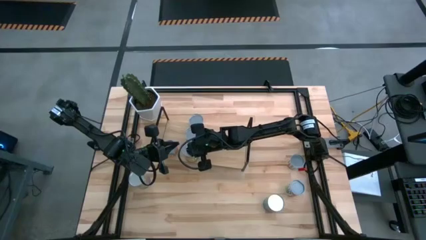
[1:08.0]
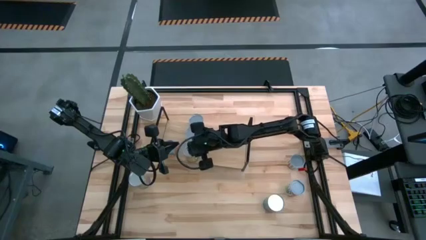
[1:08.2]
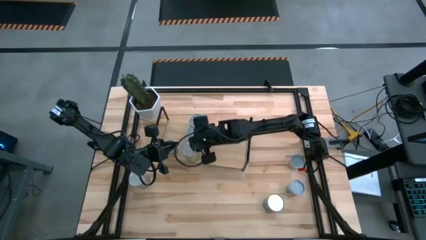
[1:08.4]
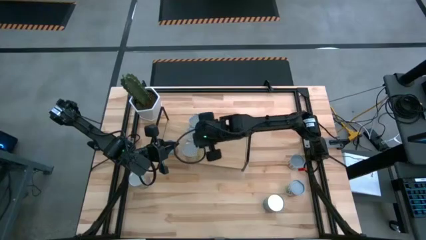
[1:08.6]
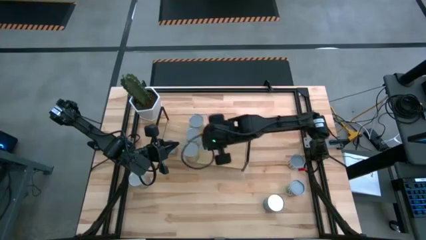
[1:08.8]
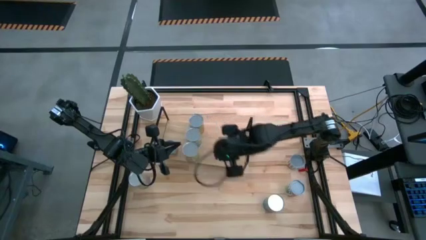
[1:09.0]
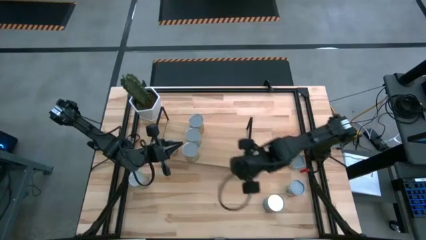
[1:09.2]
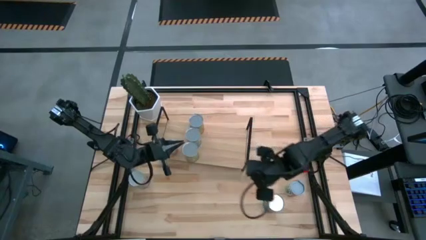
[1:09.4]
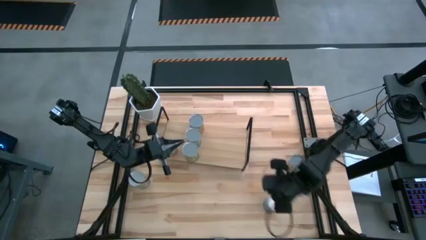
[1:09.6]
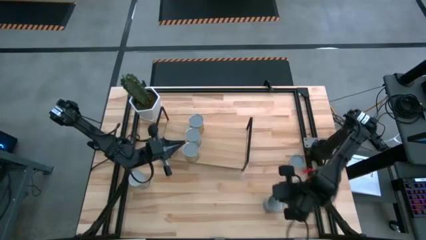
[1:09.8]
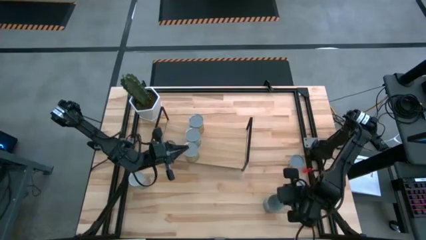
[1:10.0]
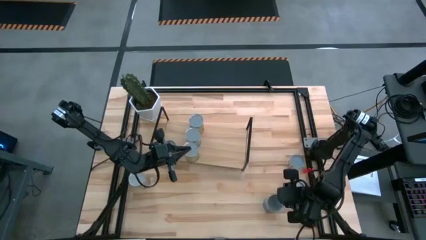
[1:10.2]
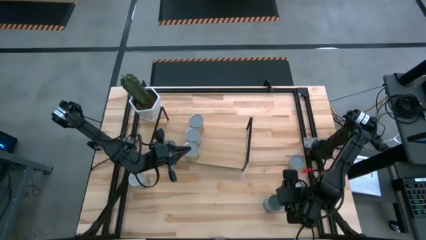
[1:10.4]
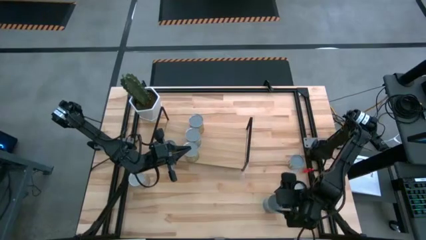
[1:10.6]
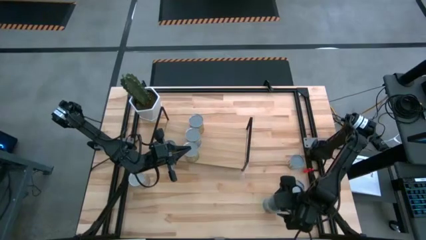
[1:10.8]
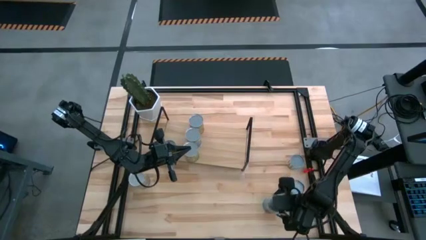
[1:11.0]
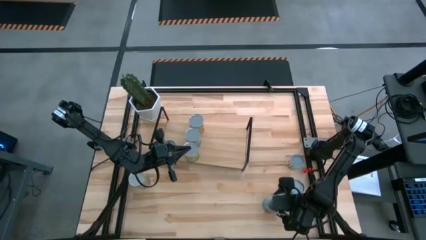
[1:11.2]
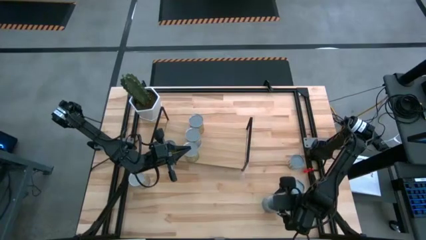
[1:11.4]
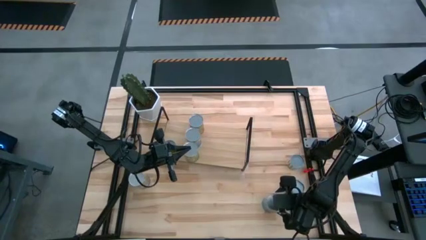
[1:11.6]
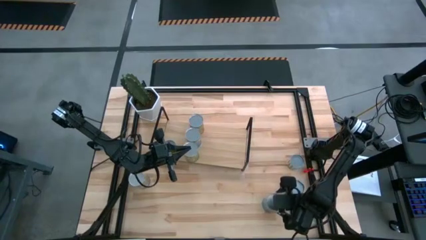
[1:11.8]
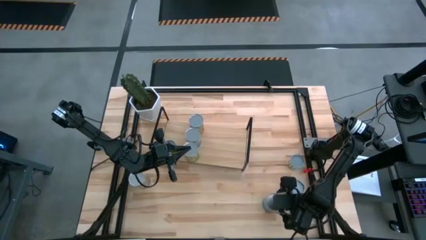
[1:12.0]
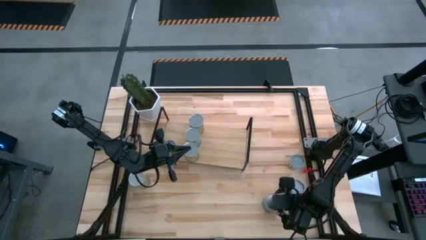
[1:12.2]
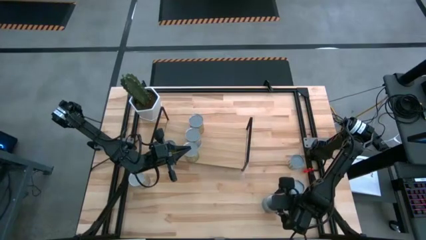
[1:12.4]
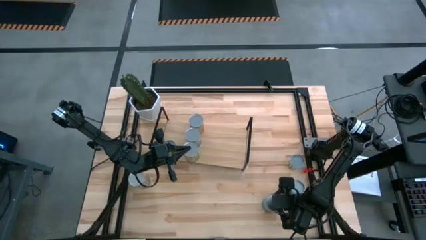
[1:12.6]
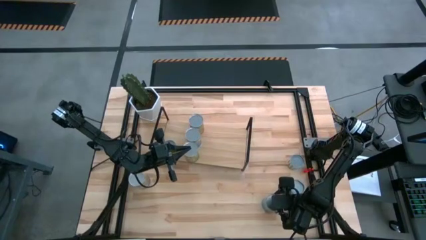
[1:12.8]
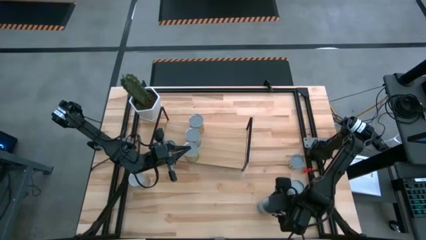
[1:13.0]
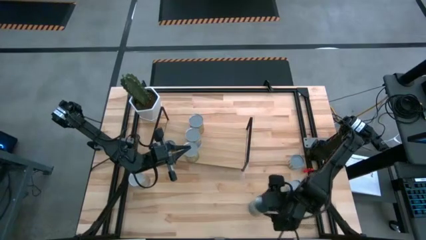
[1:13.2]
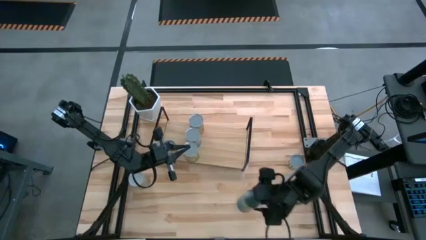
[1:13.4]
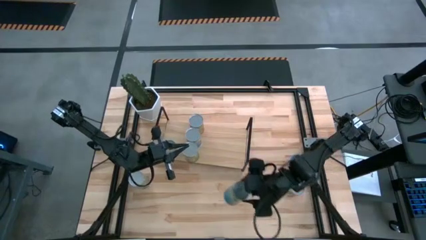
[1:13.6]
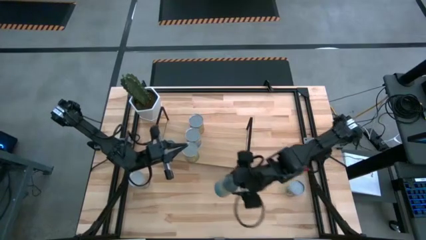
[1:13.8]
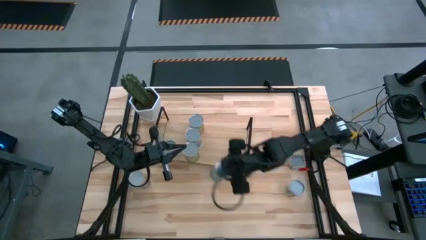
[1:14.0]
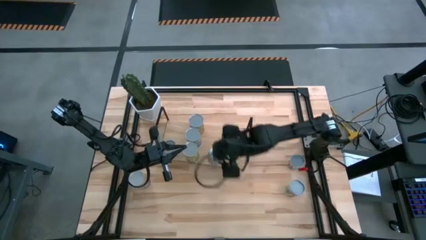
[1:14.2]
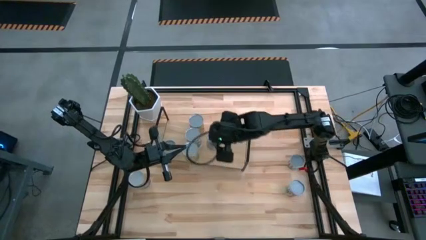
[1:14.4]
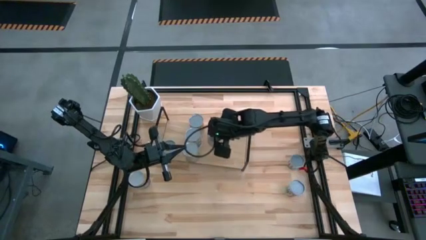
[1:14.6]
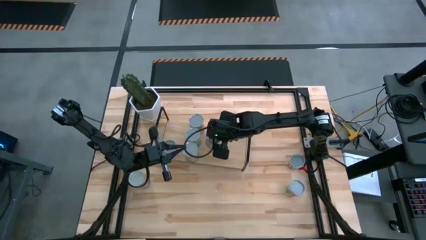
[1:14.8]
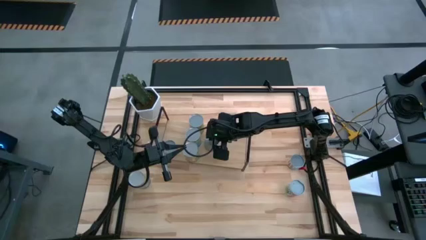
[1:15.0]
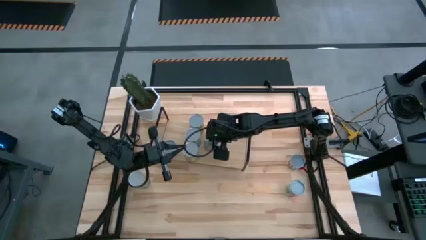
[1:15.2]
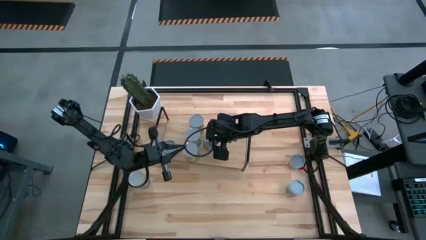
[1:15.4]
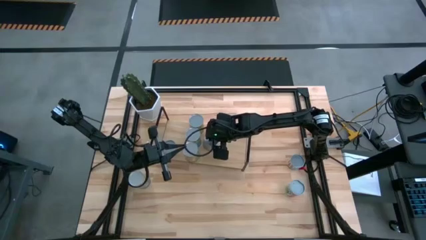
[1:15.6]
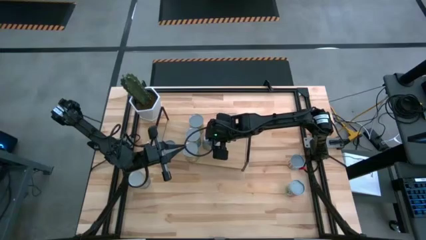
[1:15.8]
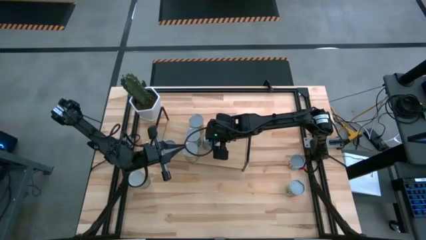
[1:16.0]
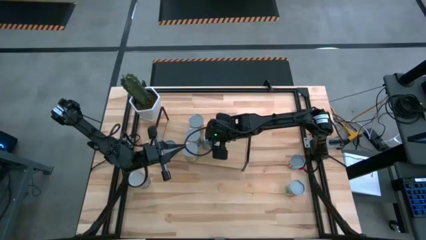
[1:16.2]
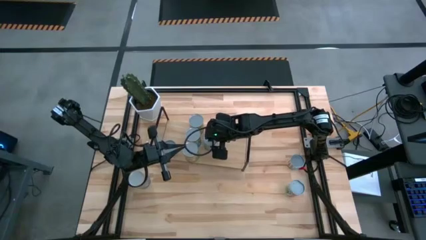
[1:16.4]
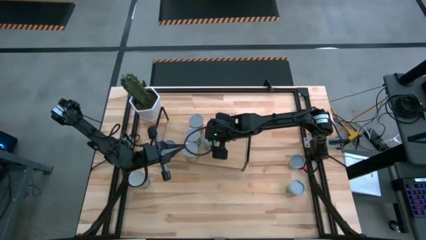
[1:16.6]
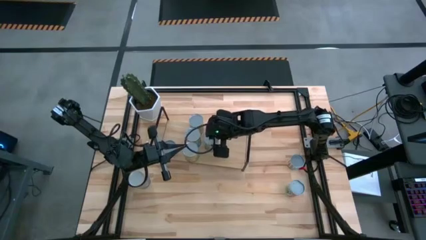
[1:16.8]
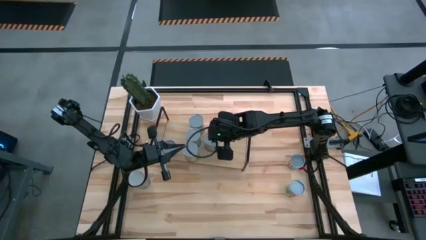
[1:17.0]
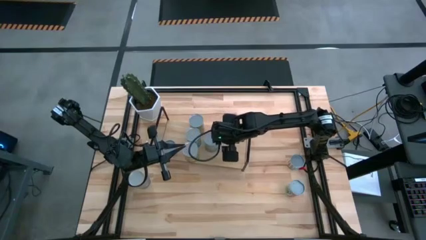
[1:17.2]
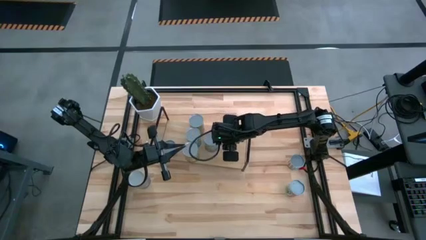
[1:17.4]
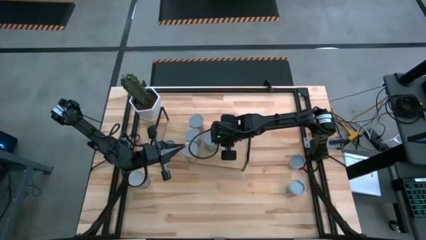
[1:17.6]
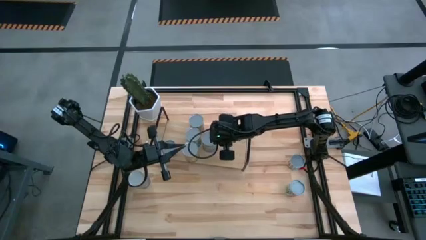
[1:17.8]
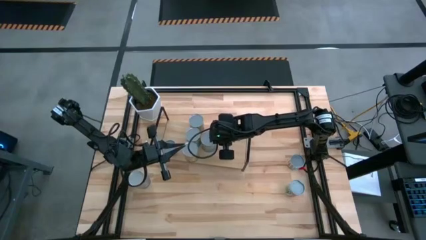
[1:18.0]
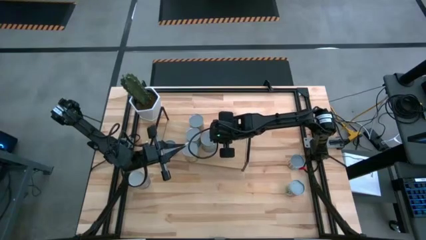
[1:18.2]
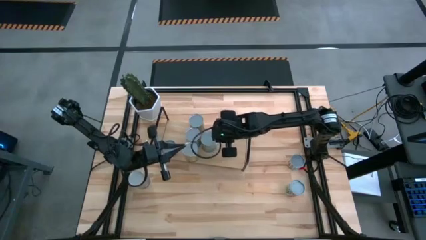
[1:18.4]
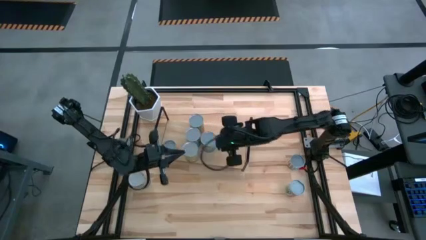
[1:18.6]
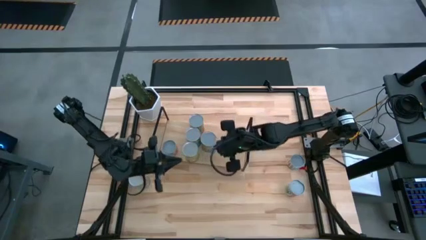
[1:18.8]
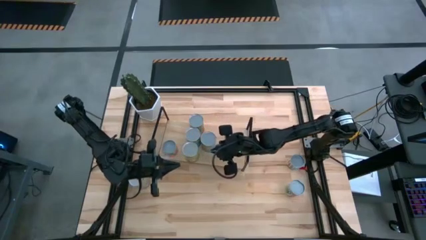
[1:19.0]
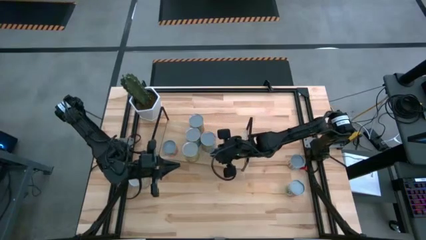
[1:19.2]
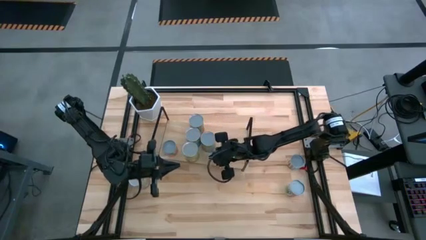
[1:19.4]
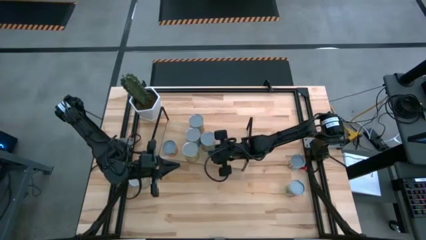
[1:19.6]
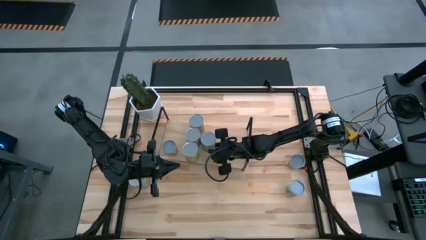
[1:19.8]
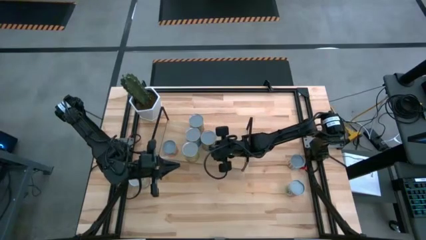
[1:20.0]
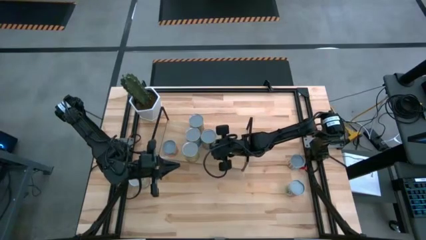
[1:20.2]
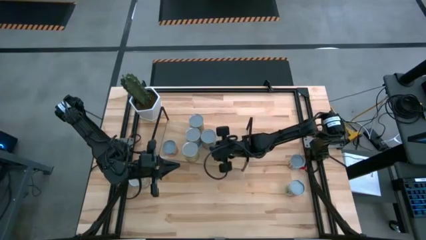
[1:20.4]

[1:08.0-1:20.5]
Task: Pick and place cans onto a shelf
Put the canned cherries on the shelf

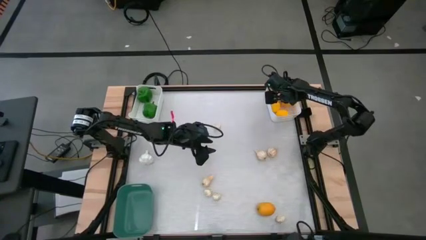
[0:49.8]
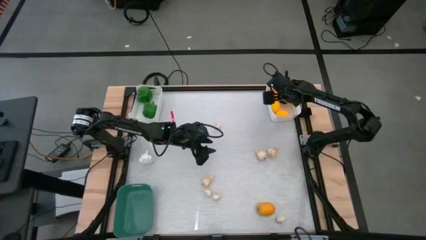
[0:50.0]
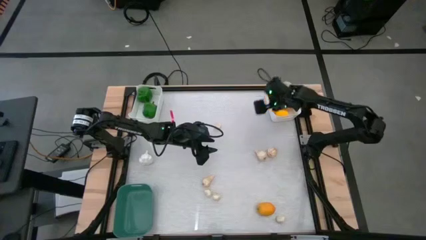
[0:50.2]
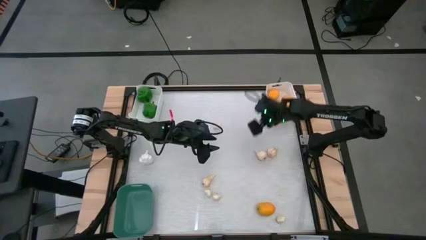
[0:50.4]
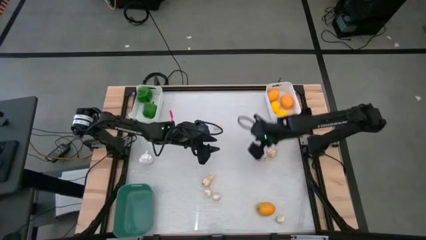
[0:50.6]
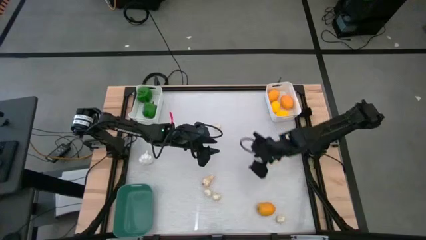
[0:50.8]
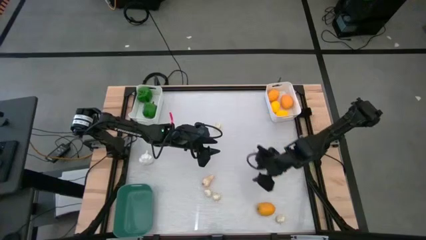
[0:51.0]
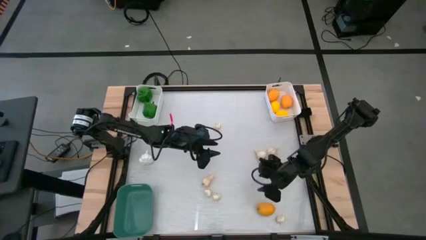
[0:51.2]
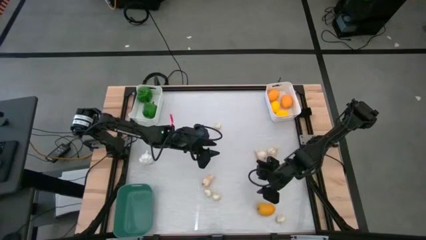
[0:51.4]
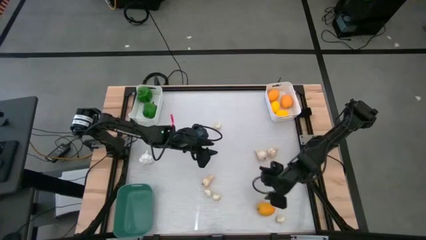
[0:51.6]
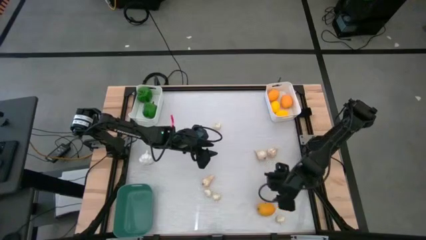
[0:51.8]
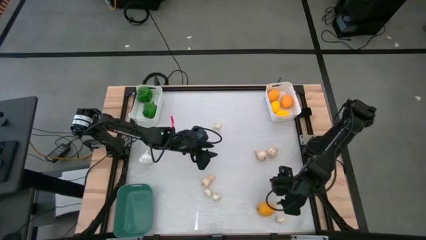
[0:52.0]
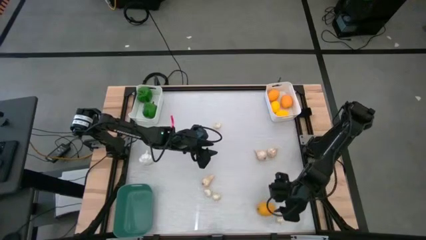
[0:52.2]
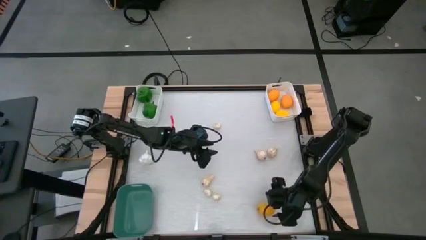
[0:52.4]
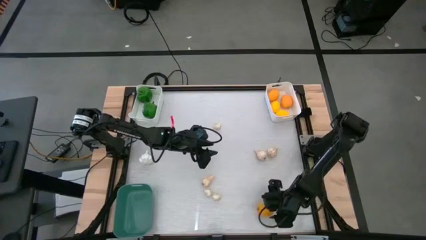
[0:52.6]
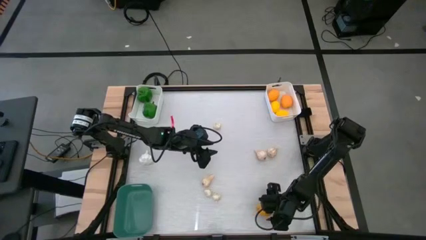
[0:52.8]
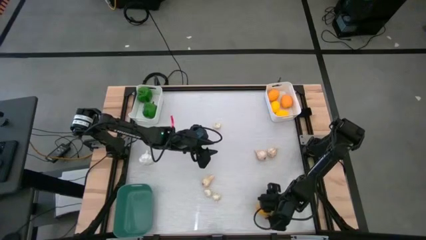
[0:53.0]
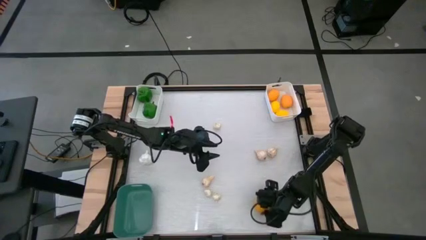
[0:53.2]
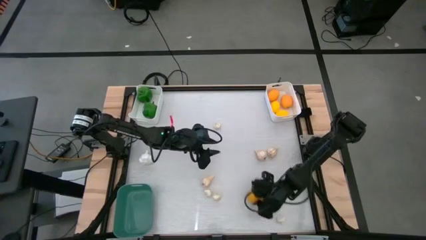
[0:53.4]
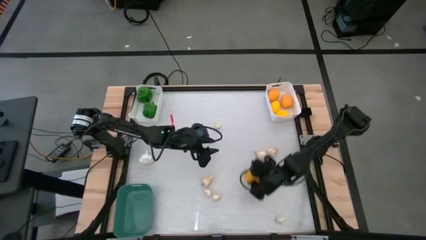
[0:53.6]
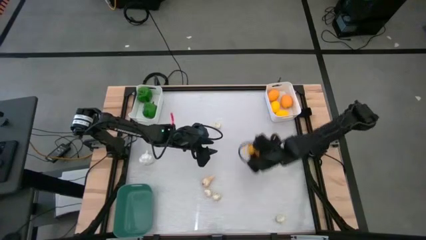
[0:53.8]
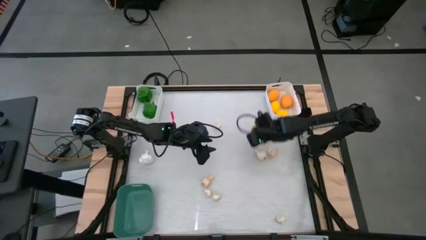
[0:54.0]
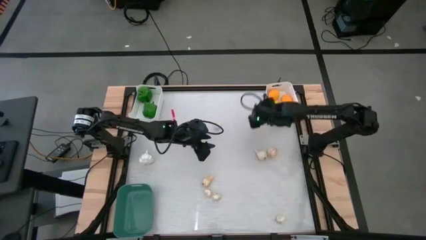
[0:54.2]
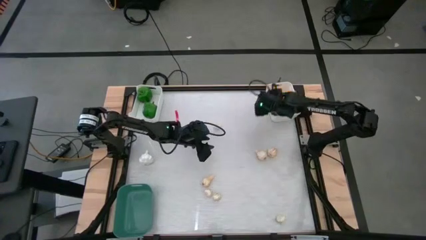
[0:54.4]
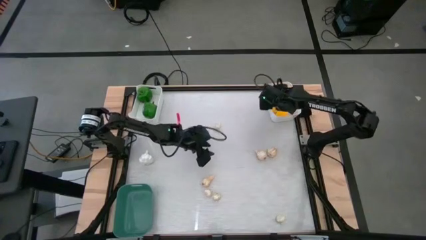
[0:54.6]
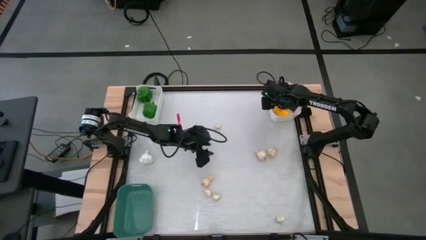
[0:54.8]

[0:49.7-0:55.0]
Task: Sort produce into baskets
Put the yellow lemon into the right white bin
